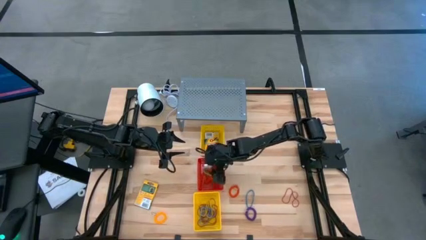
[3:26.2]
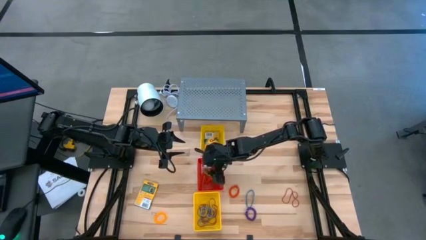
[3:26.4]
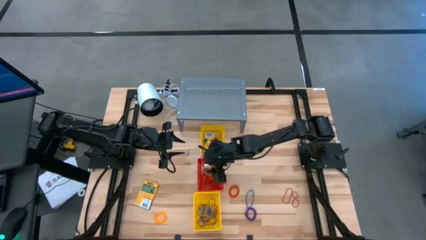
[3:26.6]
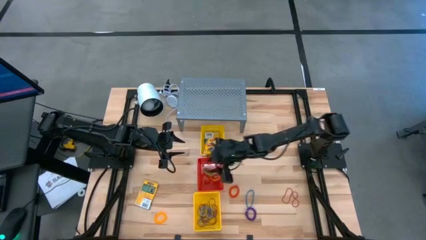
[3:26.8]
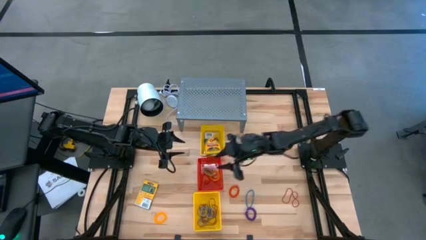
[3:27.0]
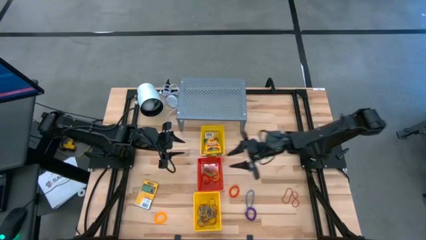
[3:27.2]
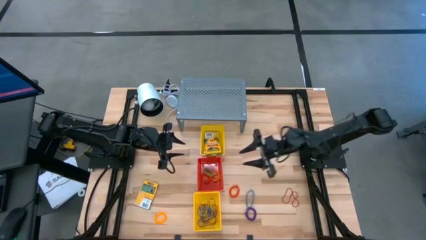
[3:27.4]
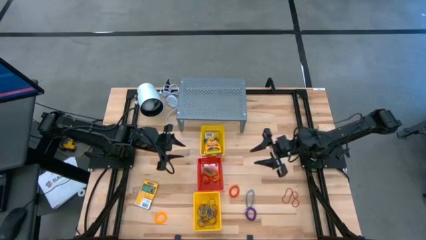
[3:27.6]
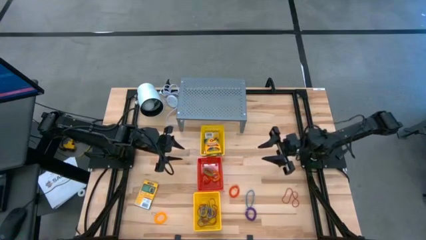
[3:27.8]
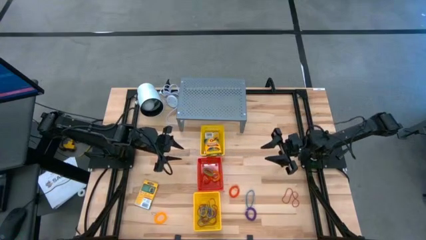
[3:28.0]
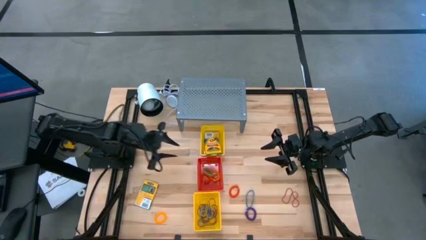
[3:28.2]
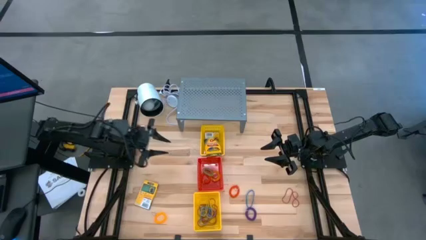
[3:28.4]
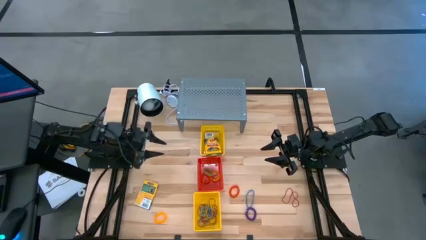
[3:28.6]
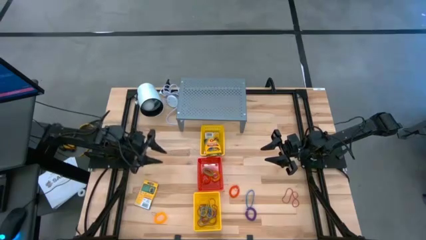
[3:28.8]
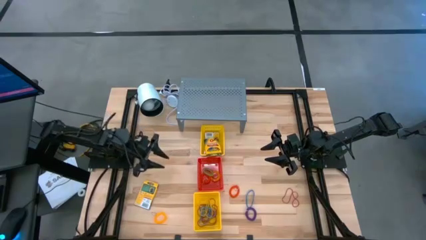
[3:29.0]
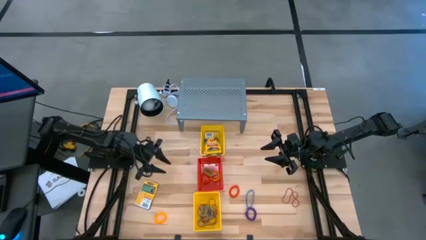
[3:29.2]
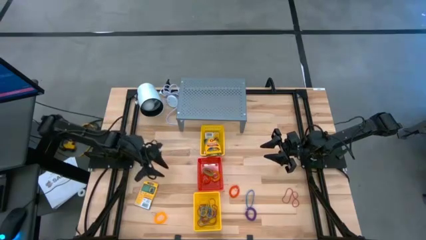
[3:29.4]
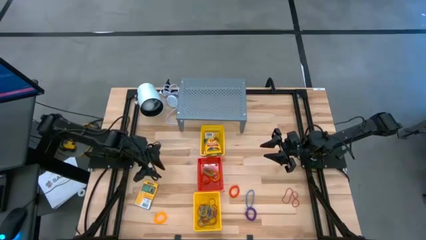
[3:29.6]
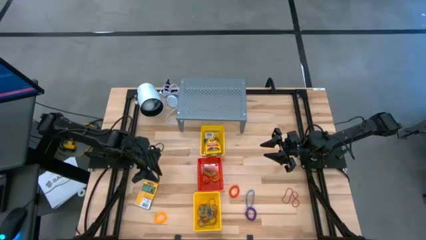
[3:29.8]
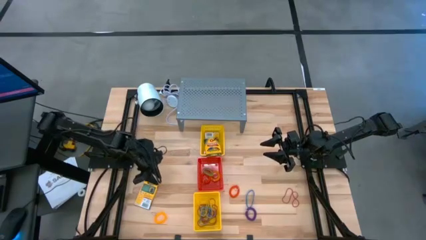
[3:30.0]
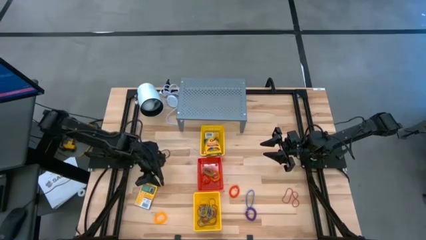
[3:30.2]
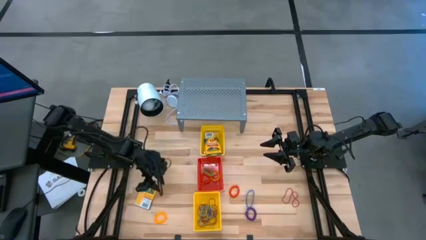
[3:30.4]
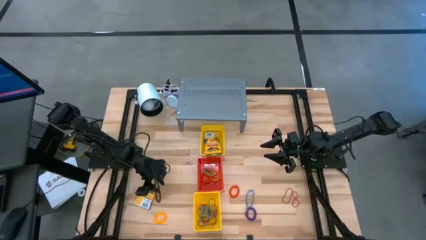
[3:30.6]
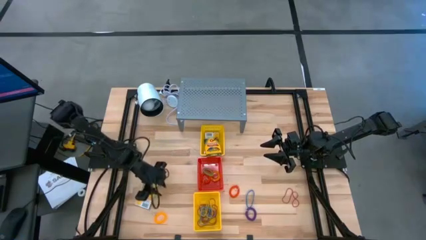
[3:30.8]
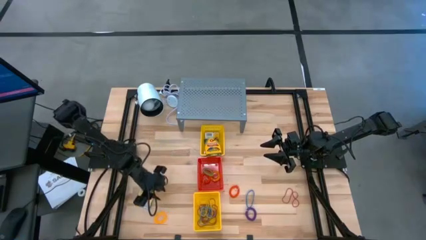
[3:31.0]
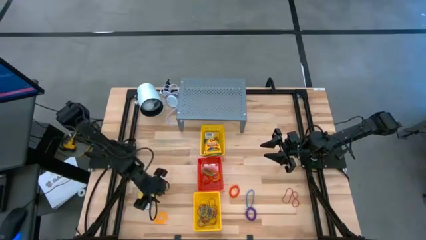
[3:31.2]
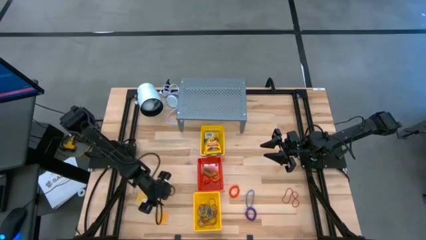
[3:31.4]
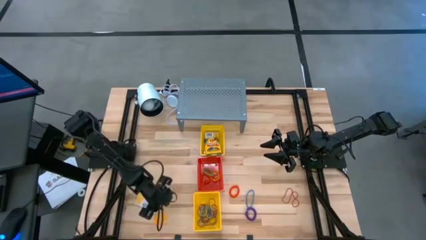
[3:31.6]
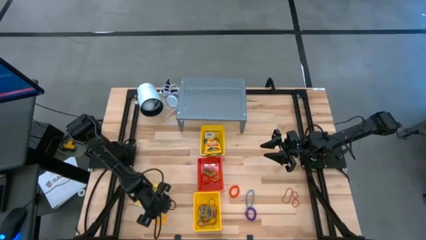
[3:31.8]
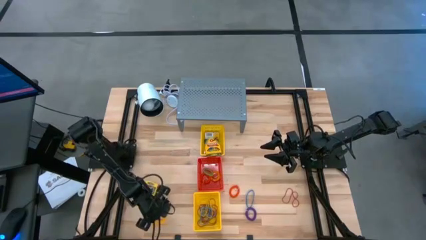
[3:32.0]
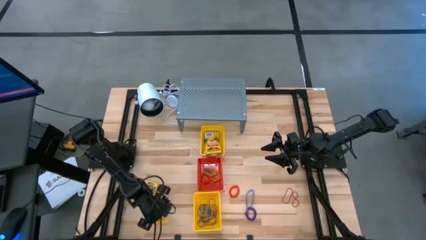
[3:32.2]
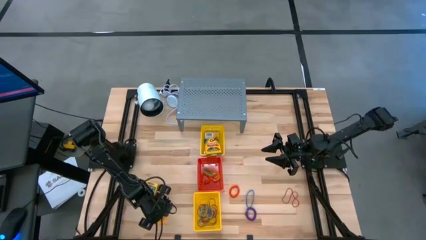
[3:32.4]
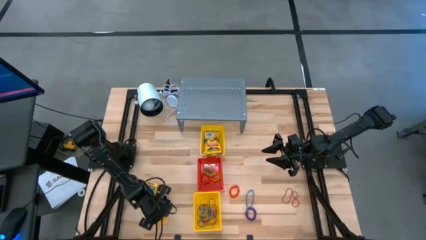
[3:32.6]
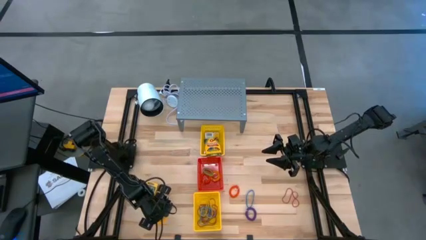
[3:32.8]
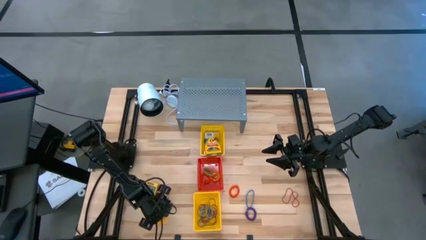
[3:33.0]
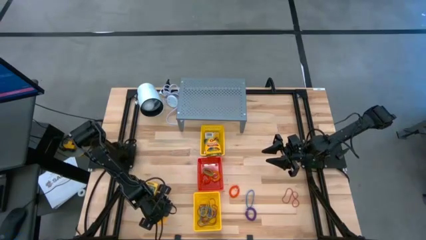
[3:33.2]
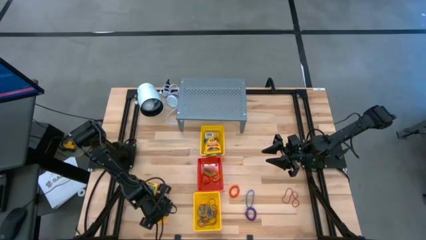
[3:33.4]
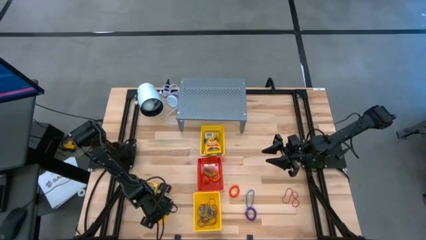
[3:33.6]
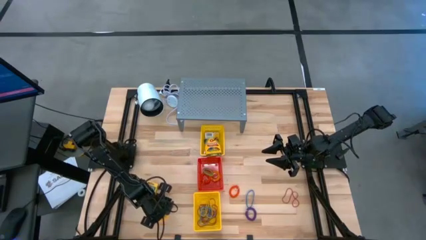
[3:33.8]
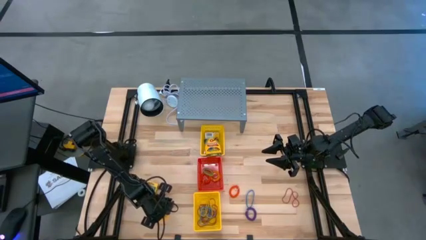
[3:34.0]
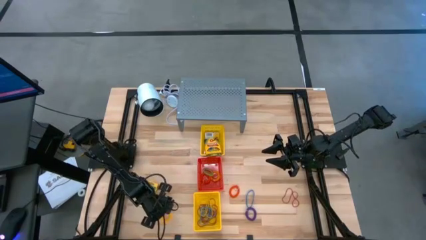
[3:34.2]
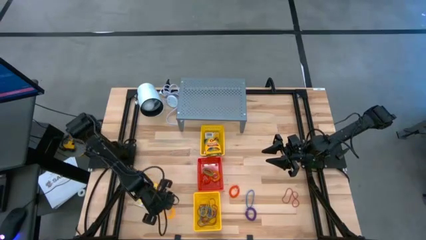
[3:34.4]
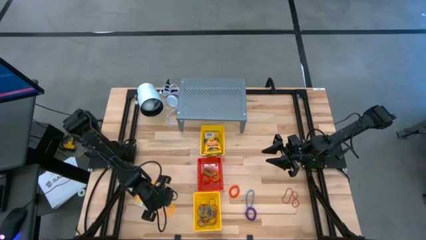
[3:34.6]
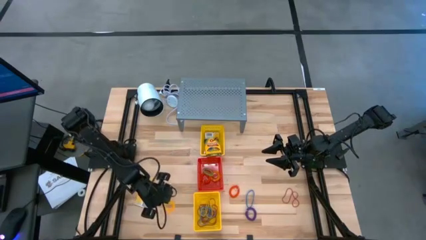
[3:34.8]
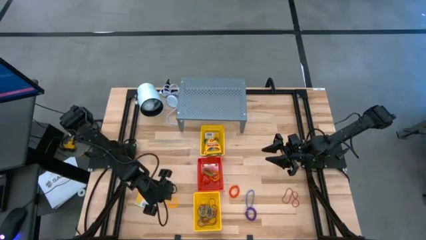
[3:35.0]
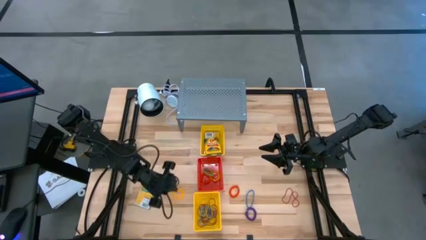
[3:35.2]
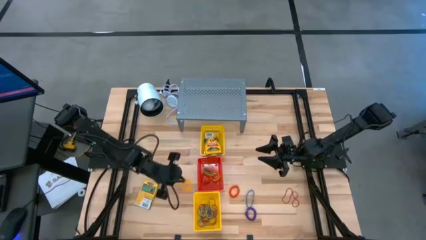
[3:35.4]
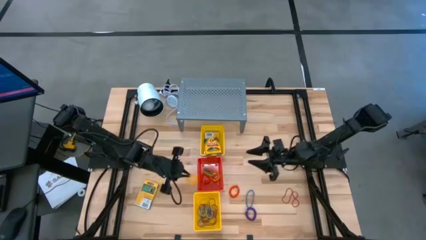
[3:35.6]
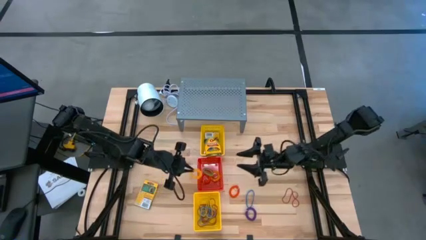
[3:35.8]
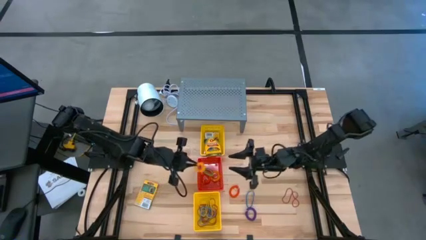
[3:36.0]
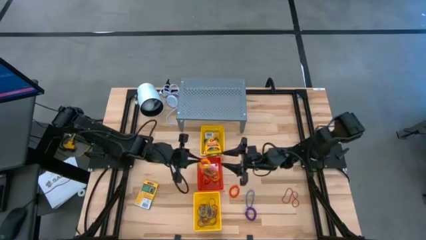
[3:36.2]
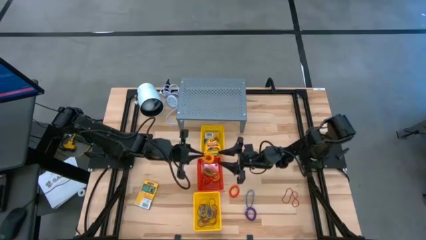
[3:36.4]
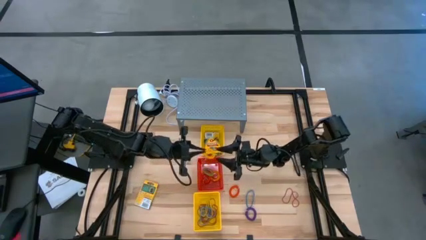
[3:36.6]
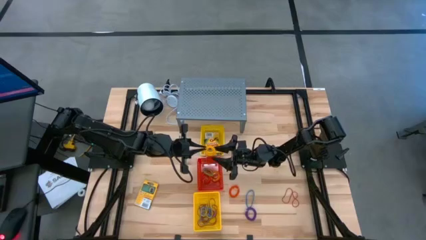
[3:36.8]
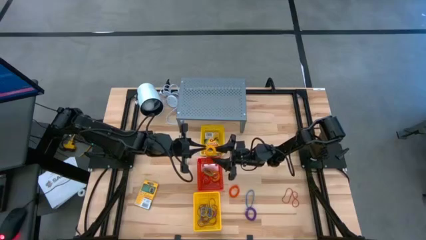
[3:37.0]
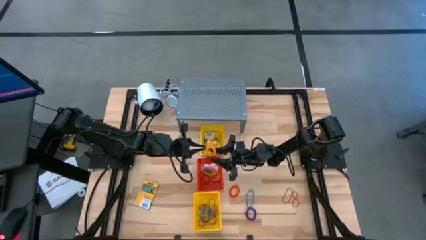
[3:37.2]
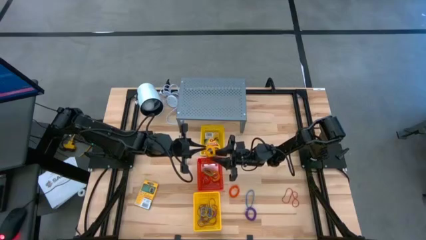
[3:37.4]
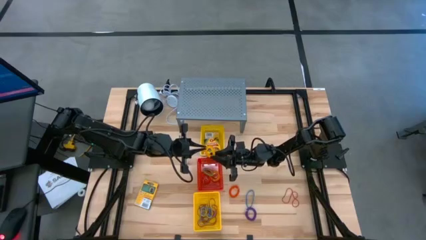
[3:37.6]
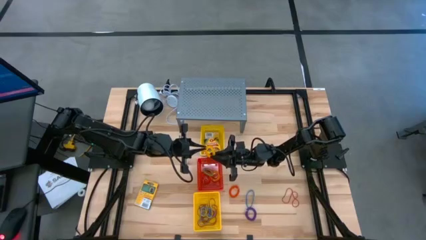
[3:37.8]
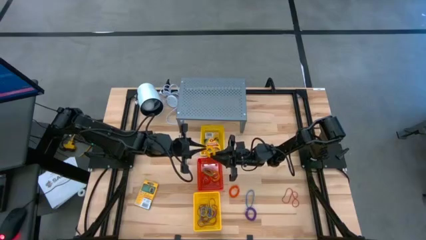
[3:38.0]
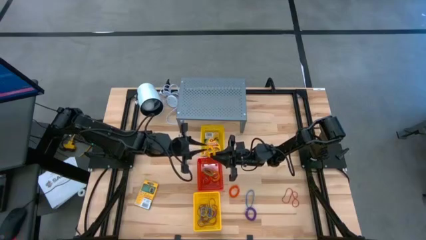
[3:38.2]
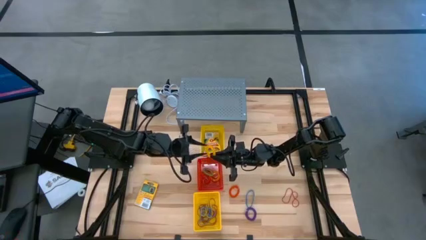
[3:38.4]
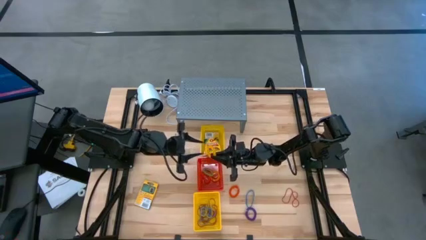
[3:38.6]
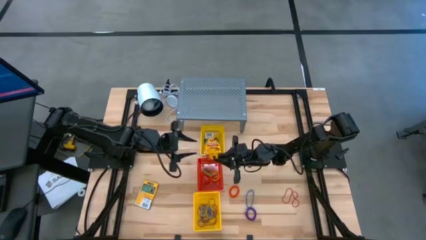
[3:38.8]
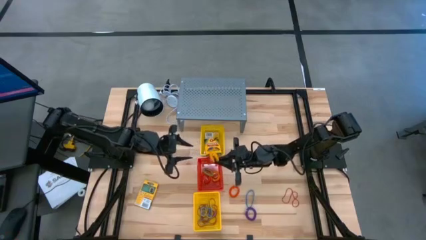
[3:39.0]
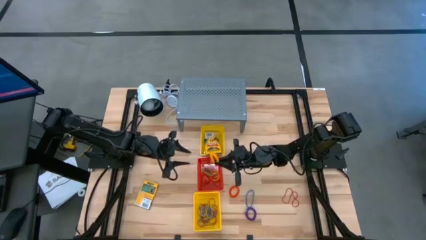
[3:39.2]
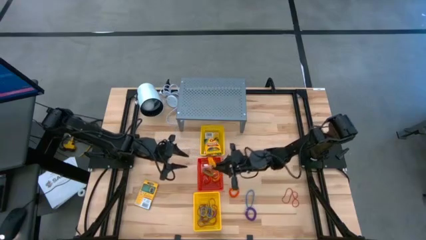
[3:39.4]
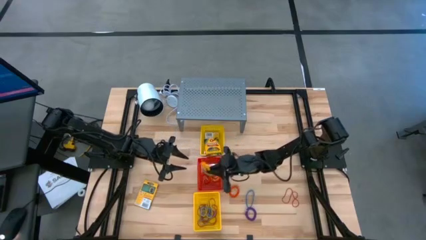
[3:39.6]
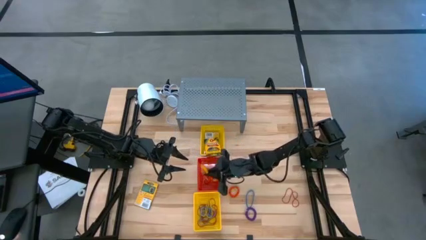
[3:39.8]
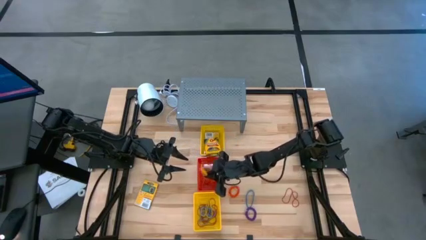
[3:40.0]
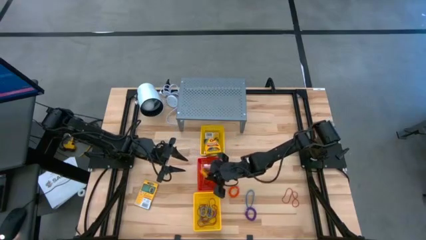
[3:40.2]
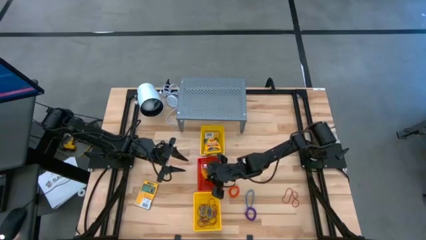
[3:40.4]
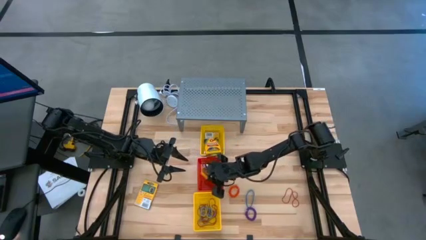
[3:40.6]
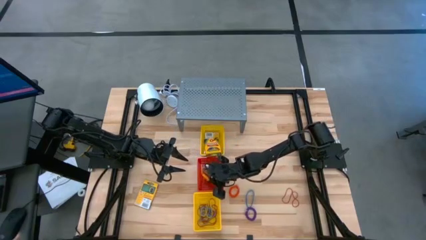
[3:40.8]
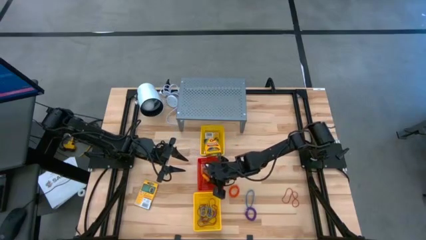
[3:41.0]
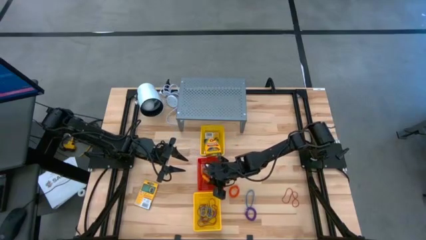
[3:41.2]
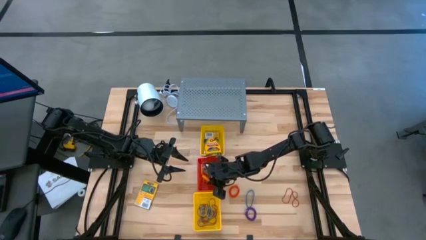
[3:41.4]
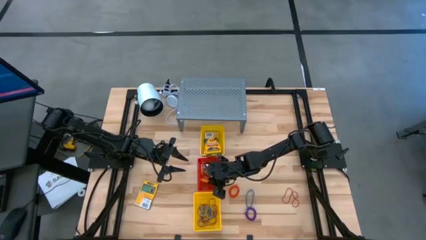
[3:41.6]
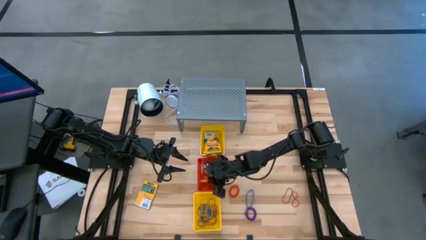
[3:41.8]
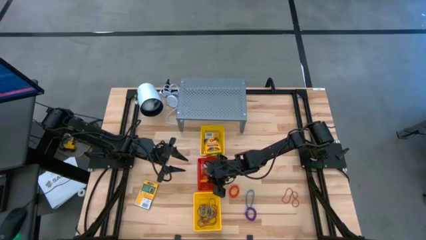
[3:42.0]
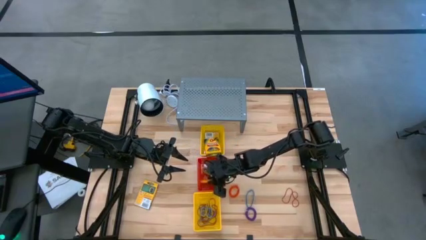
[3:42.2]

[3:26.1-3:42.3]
Task: Pick & Place Office Desk Supplies
Put the yellow spring rubber band into the red bin

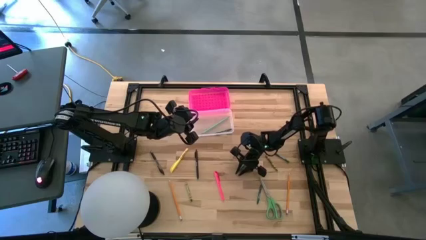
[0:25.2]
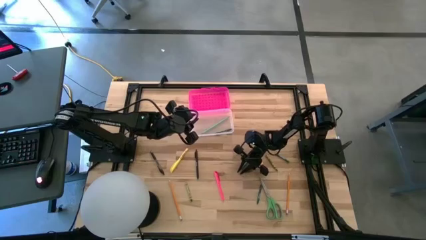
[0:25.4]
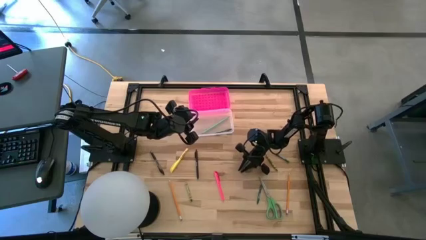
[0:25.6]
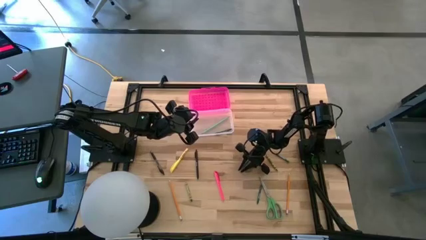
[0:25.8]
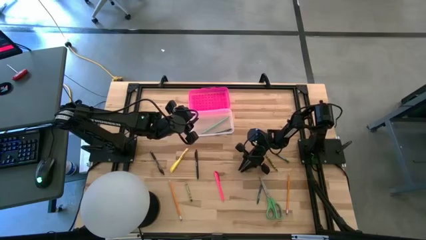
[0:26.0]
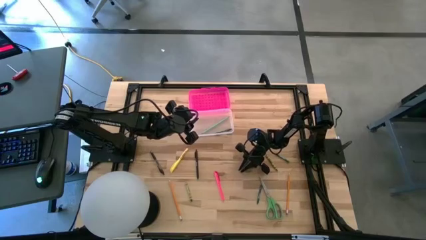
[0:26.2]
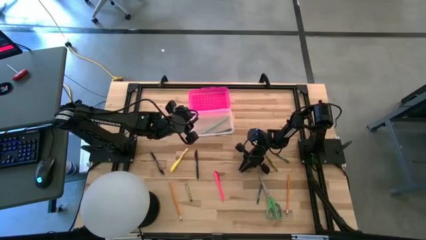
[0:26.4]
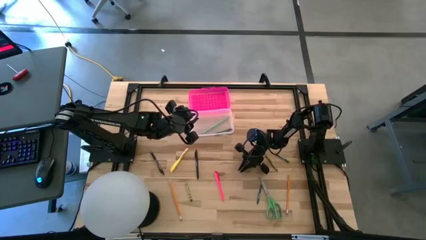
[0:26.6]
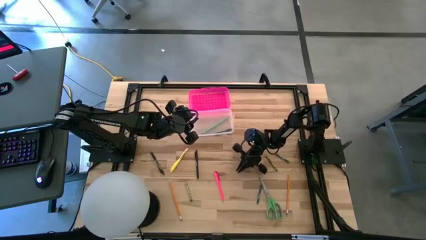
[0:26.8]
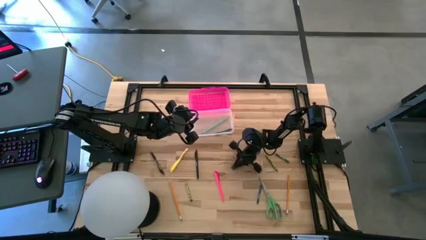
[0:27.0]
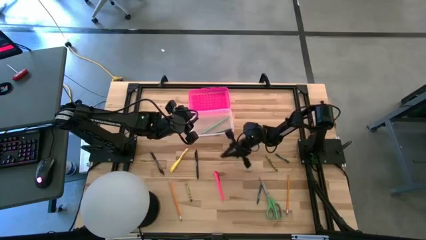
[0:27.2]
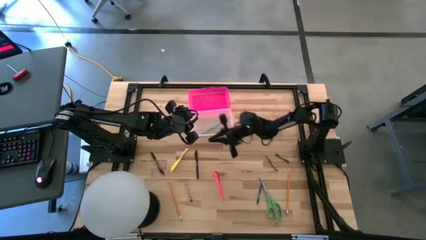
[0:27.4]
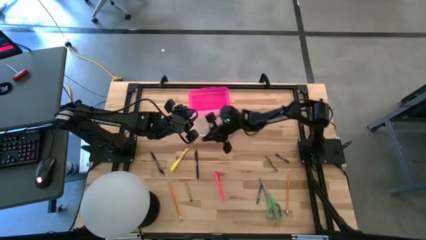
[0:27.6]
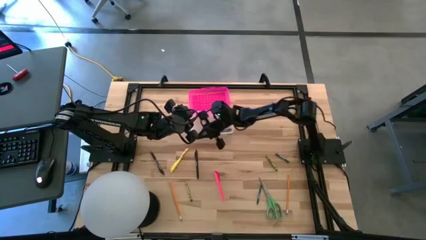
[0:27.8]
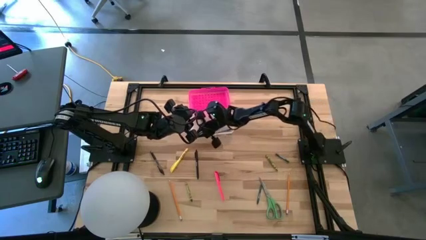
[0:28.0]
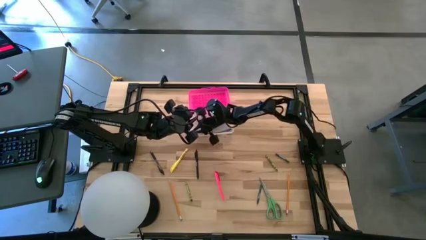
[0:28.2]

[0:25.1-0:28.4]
Task: Pick & place school supplies into a supply box
Put the blue pencil into the pink supply box
